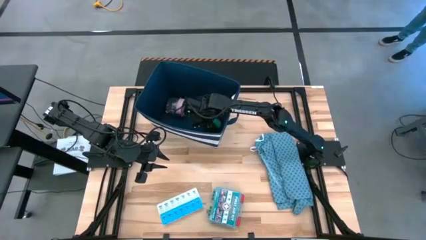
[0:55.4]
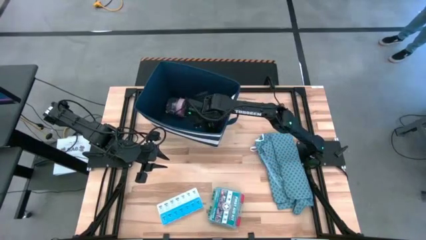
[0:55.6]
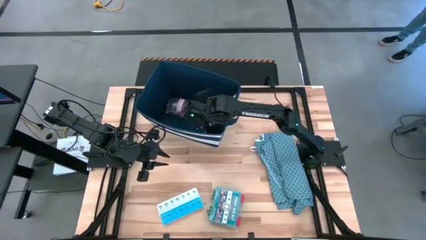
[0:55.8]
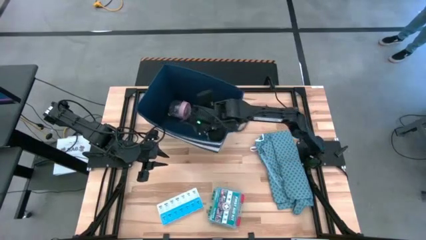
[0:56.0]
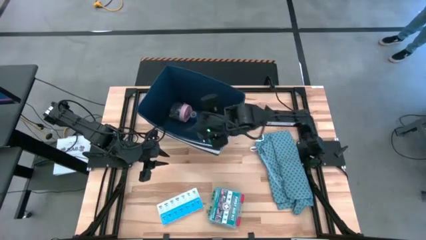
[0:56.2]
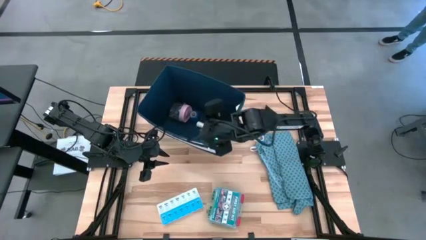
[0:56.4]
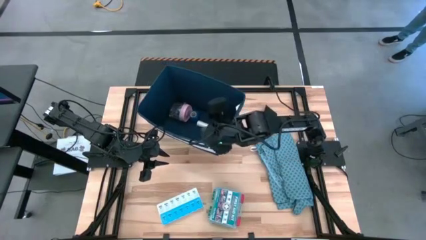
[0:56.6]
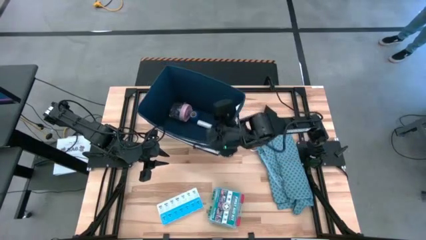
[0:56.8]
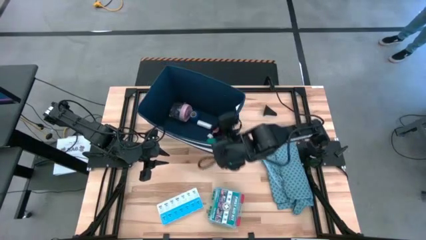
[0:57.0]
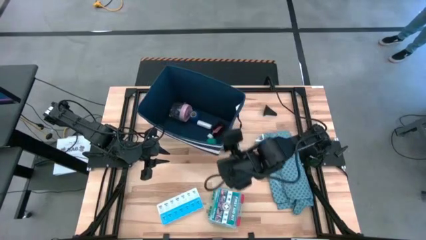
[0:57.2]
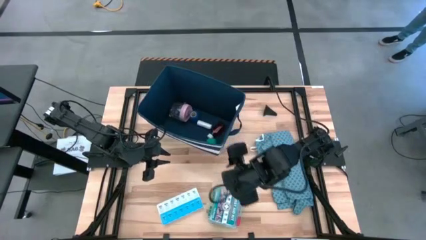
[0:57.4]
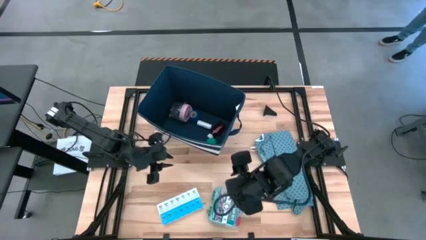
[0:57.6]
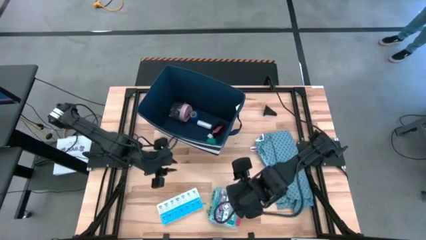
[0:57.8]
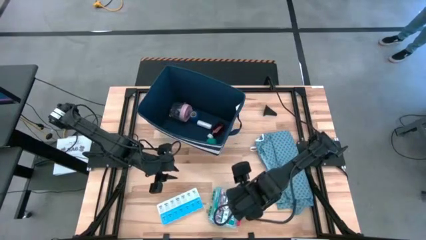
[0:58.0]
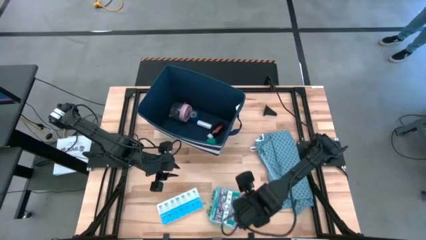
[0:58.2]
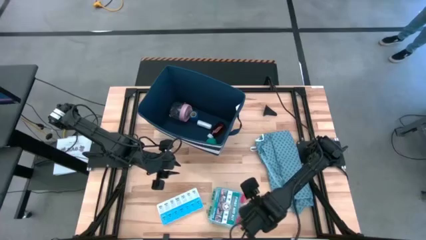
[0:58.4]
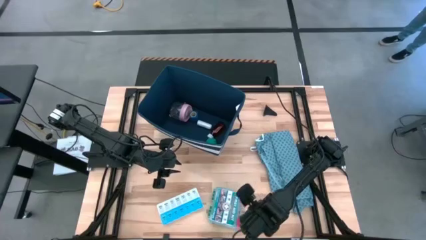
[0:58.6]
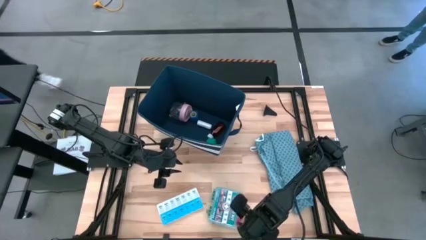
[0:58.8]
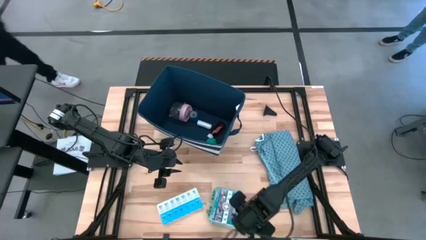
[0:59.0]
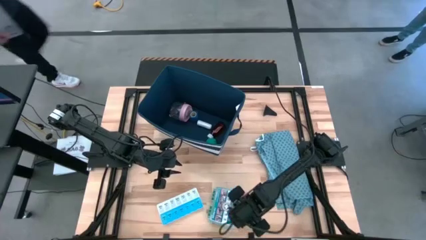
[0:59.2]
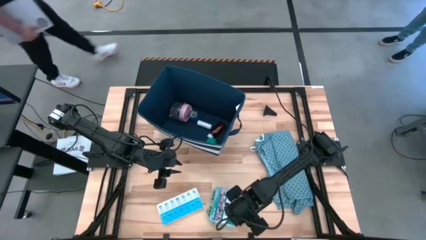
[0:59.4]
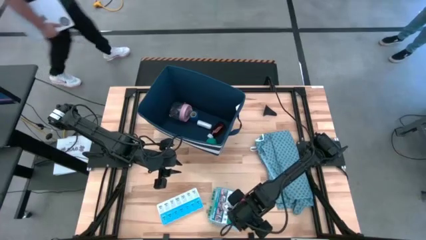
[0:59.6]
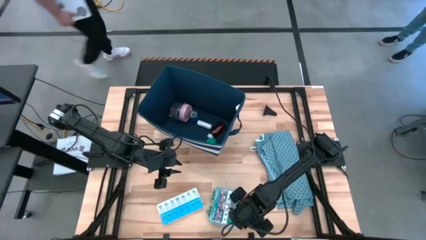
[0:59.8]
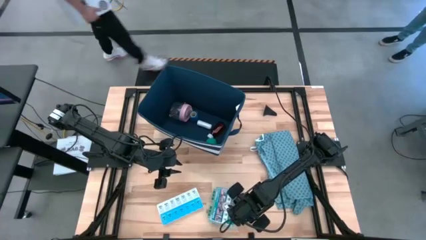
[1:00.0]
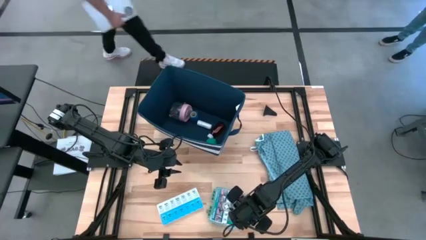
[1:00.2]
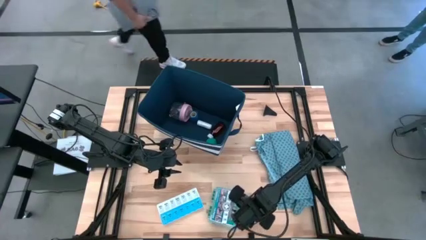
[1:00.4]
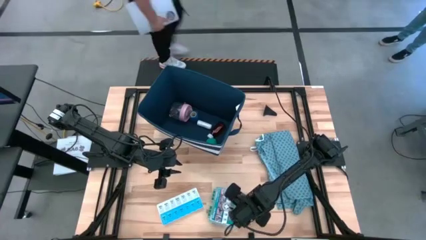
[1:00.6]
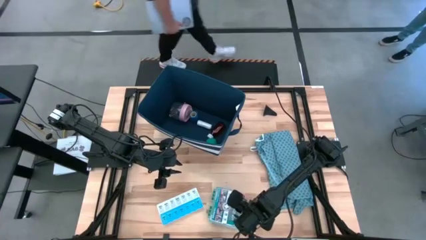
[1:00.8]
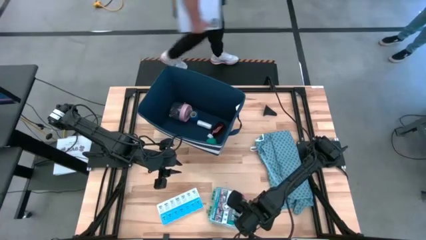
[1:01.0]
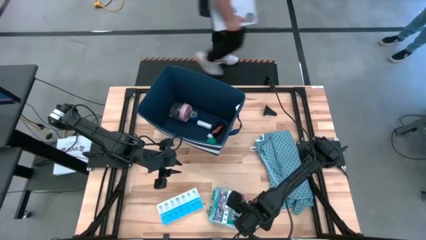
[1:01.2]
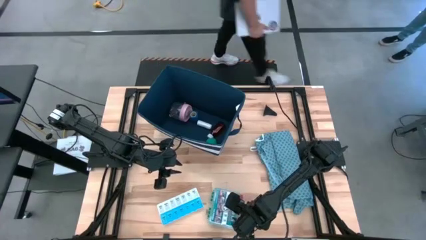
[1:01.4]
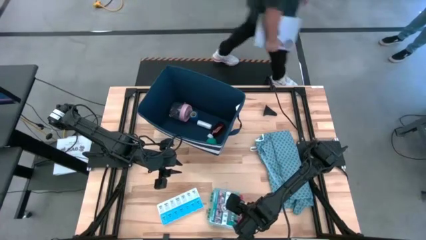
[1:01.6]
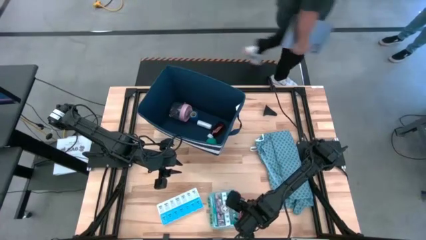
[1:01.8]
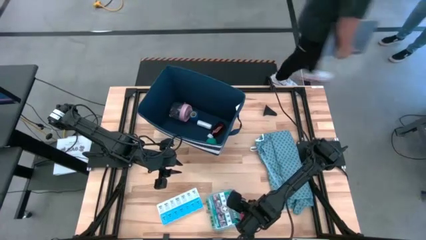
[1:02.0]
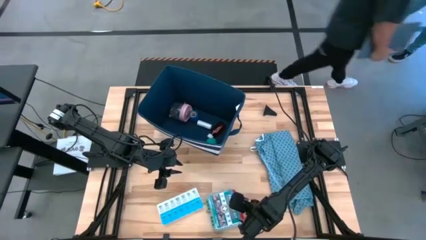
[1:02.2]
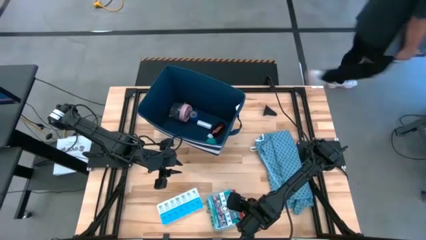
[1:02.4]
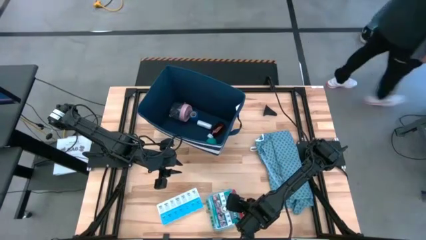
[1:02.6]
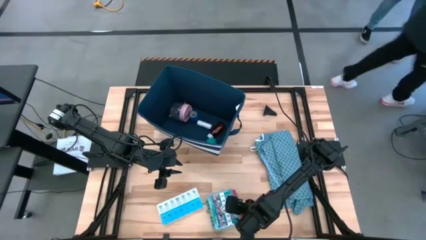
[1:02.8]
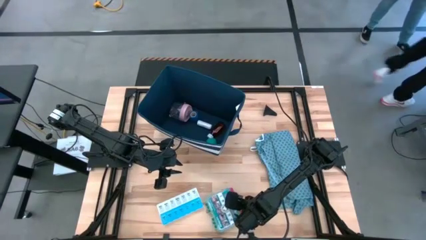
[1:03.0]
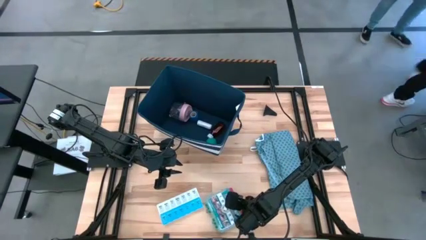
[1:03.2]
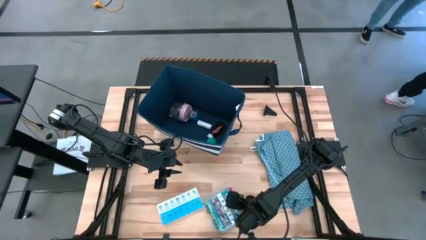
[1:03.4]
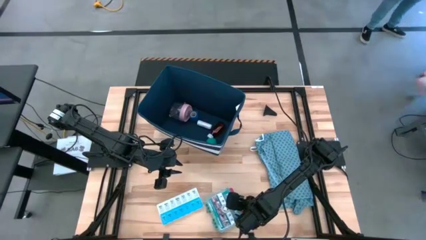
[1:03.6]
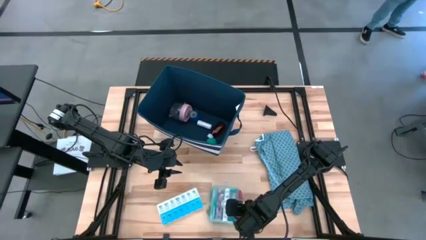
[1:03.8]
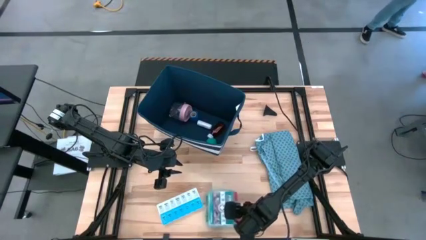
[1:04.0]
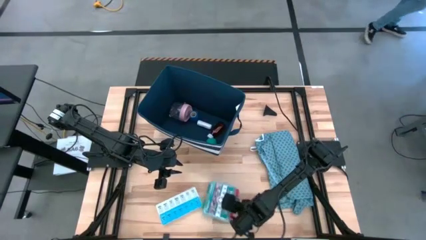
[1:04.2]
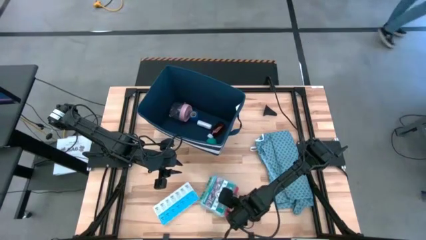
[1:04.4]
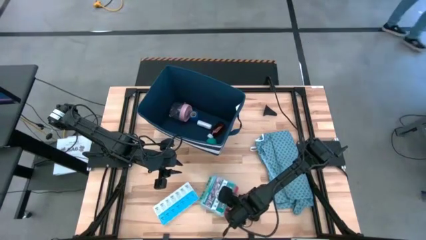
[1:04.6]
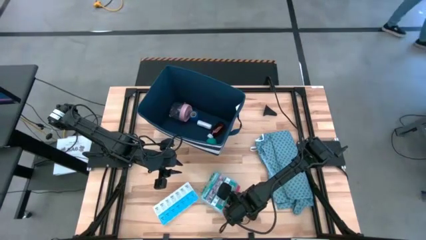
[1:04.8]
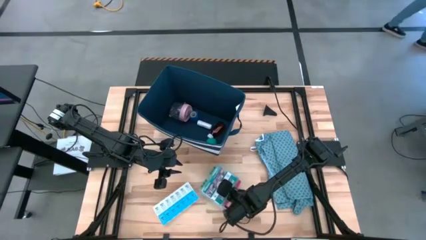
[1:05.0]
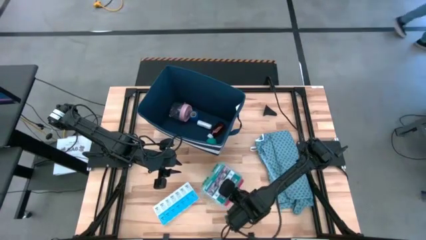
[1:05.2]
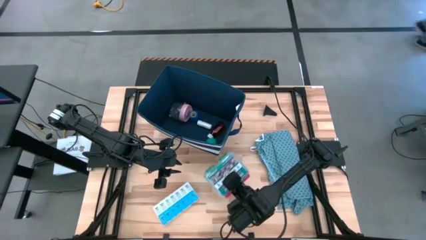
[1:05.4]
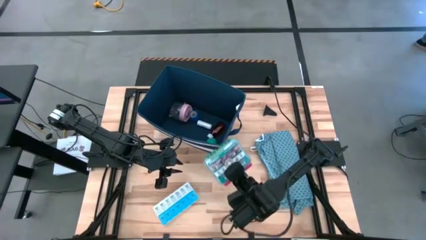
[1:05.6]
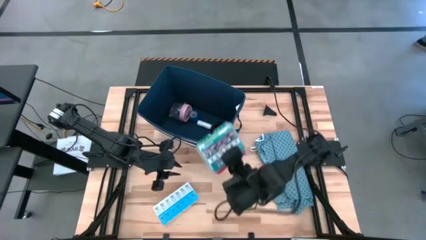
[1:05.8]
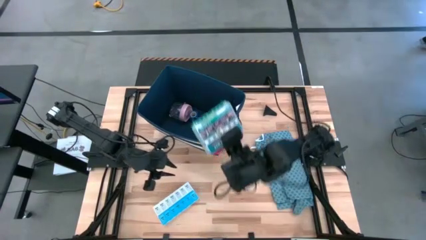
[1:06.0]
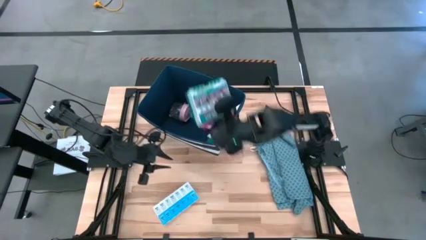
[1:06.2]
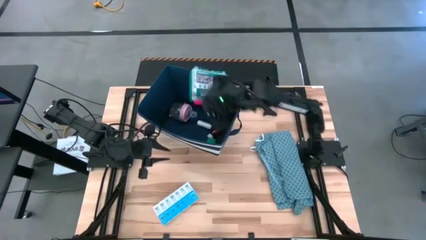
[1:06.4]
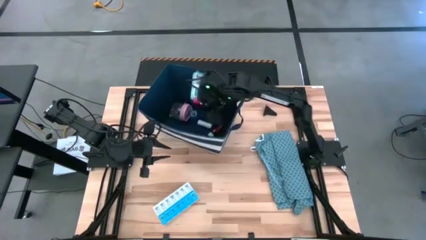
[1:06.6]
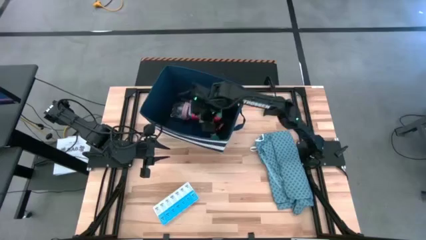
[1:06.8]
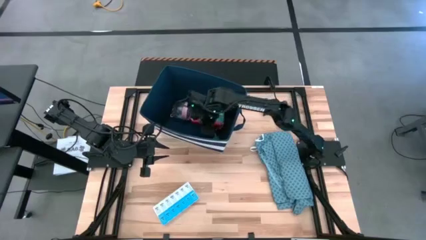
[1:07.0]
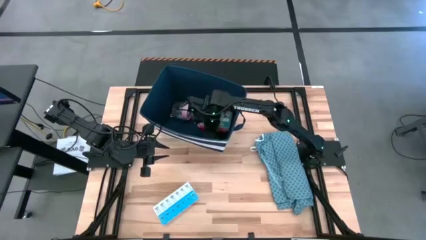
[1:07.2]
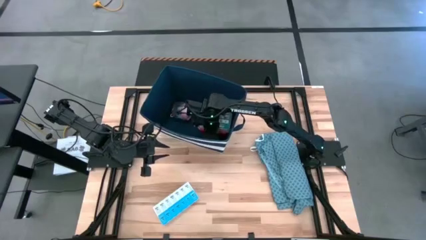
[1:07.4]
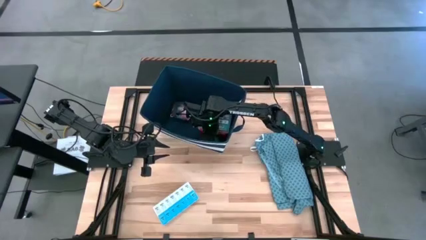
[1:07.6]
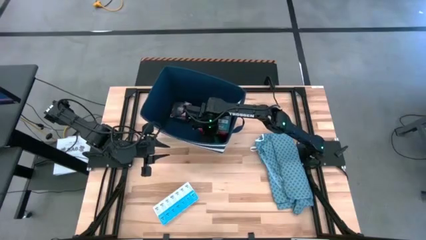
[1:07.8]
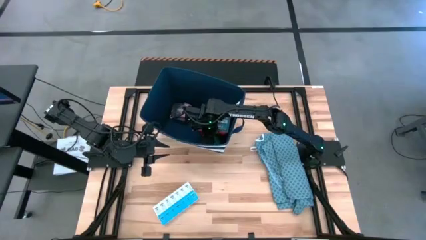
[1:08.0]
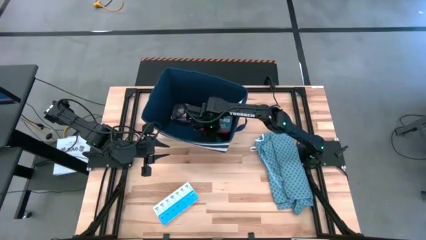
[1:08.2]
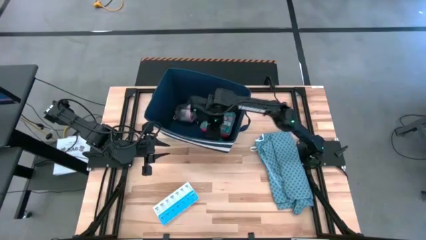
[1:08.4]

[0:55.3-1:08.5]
Task: Pick & place medical supplies in basket/bin
Put the first aid kit into the laundry organizer

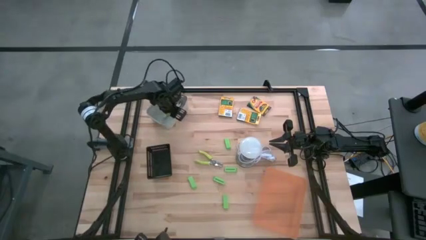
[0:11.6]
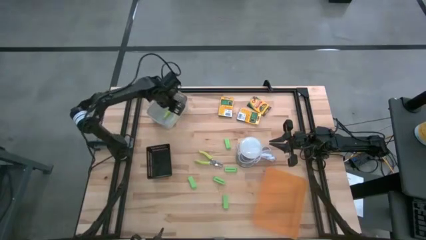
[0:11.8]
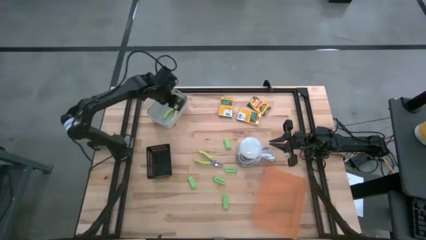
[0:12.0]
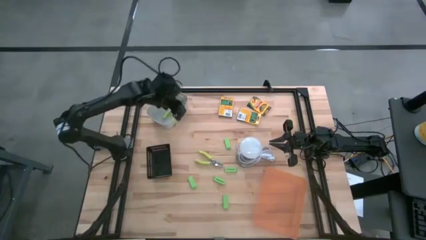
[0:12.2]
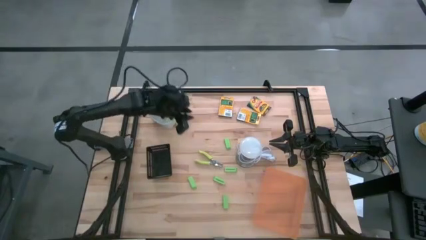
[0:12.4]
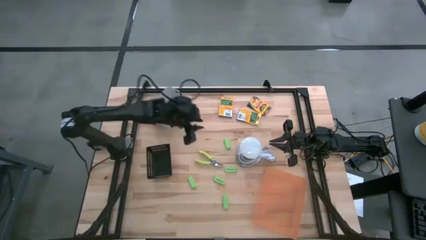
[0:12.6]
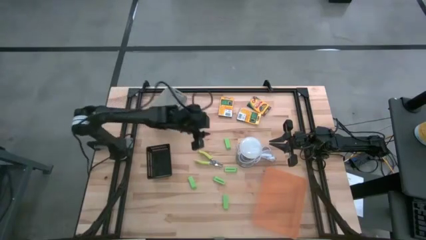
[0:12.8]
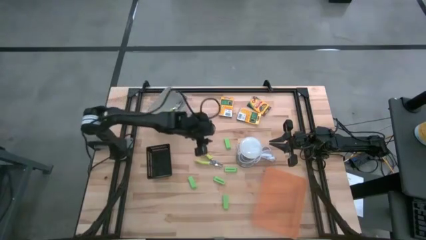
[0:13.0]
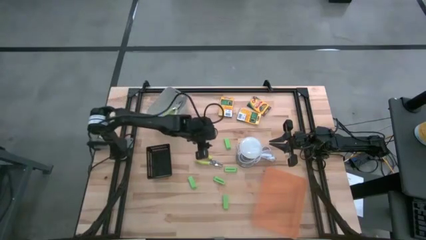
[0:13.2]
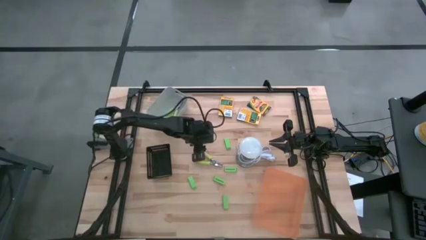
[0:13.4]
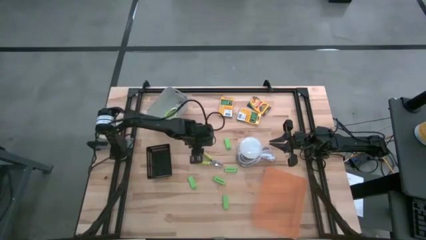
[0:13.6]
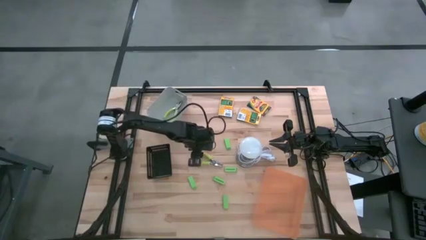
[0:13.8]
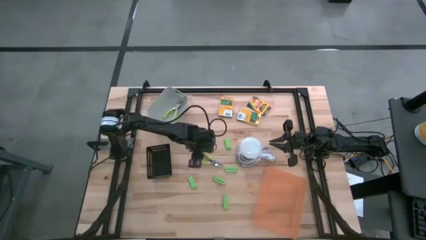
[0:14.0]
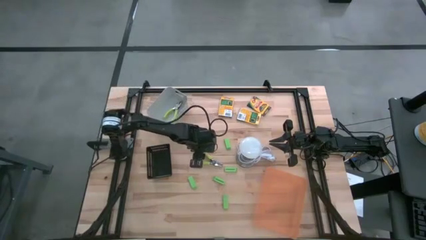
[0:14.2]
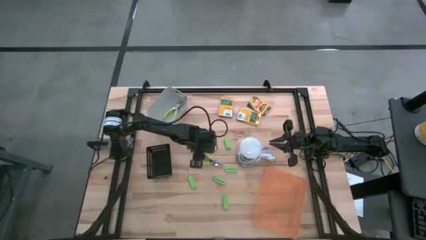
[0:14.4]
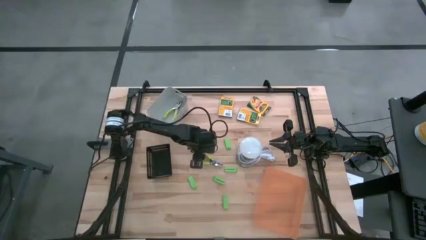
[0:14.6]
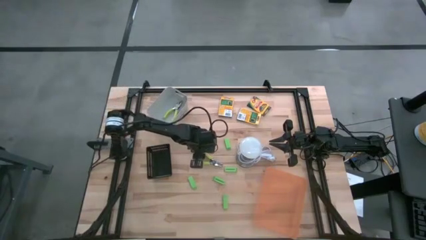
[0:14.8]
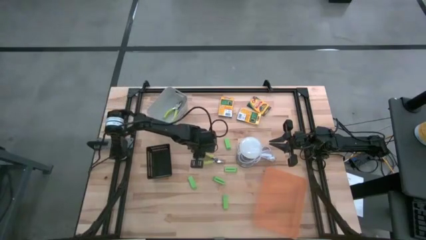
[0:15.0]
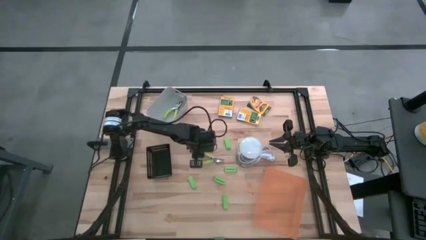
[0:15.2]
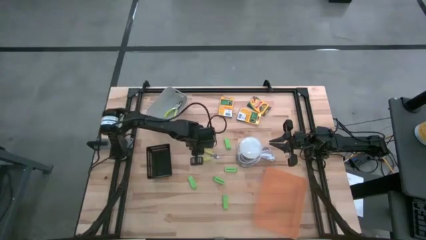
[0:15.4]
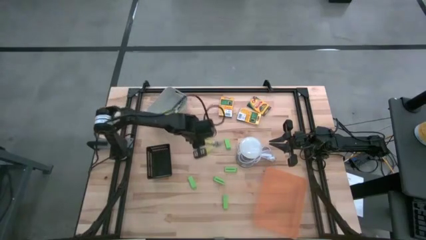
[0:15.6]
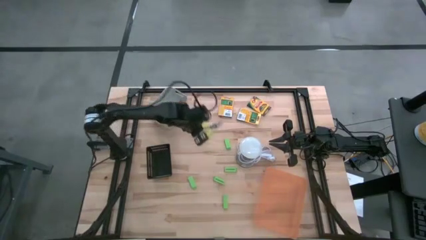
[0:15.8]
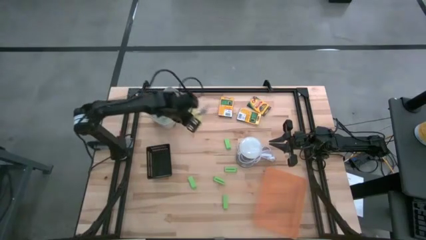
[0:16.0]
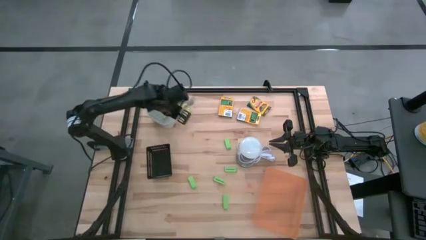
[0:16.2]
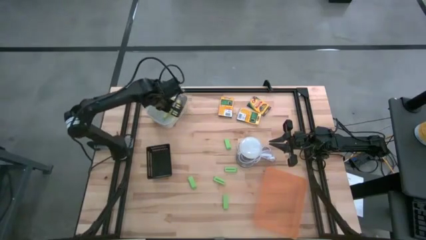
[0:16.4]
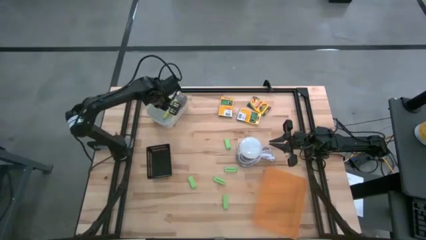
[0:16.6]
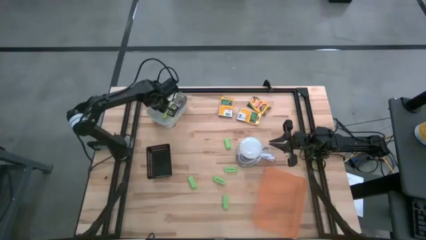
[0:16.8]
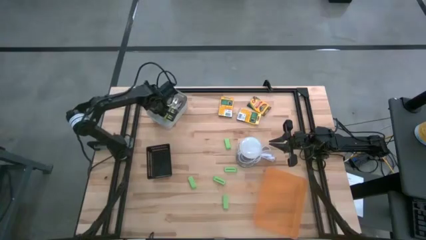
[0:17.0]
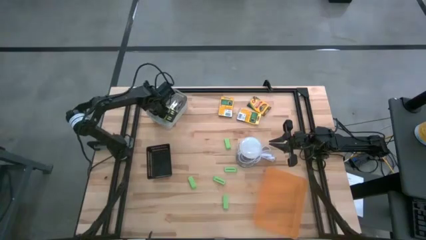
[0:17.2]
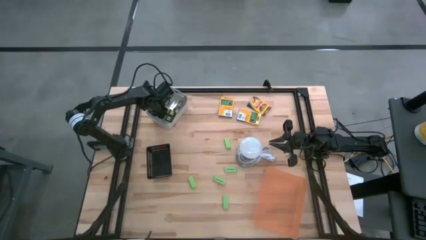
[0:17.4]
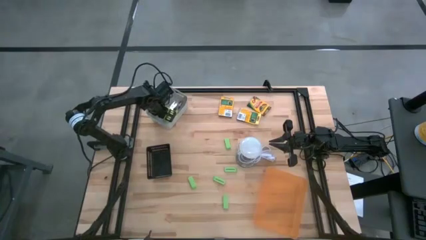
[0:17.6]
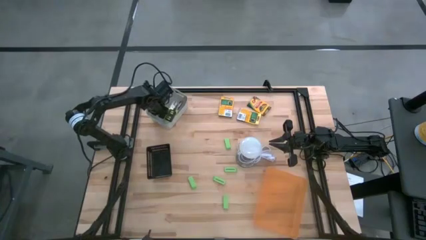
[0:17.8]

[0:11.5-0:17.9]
Task: Pick & Place School Supplies
Put the green hole puncher into the gray bin
